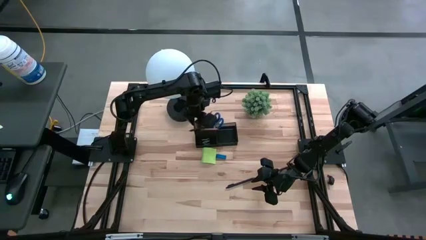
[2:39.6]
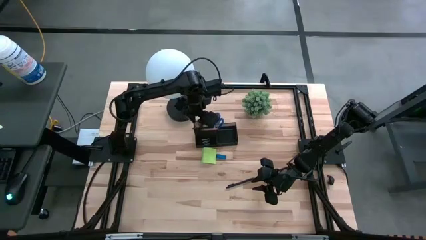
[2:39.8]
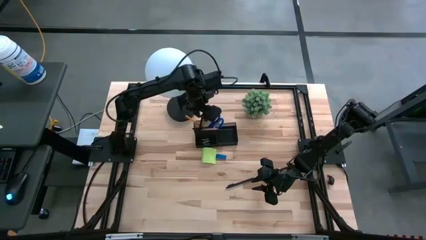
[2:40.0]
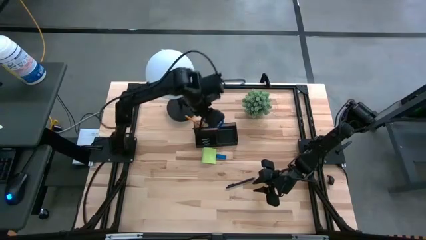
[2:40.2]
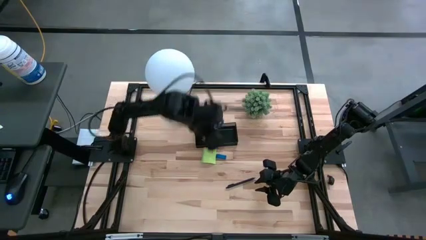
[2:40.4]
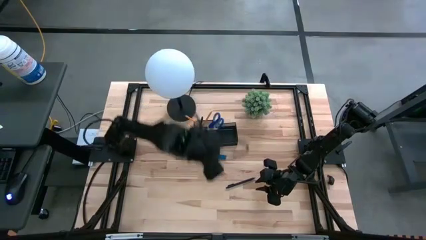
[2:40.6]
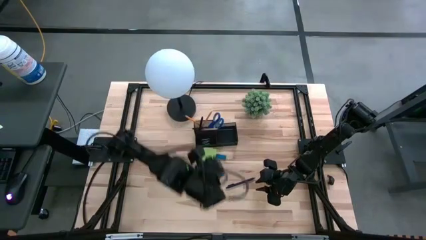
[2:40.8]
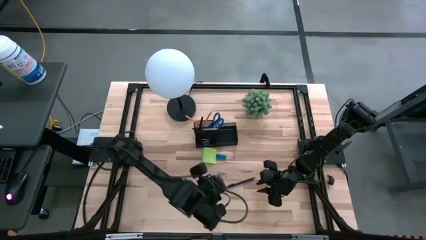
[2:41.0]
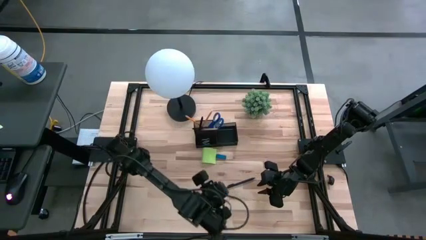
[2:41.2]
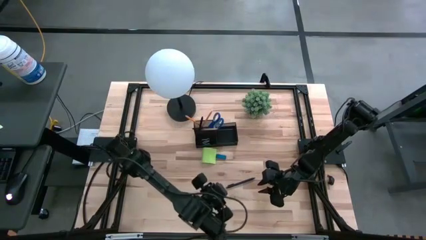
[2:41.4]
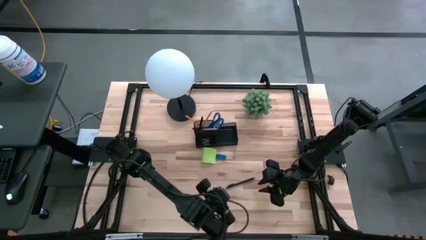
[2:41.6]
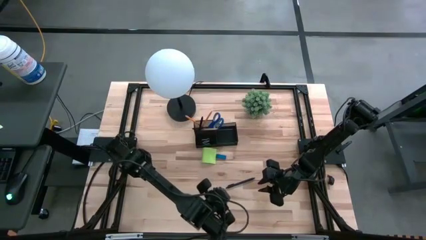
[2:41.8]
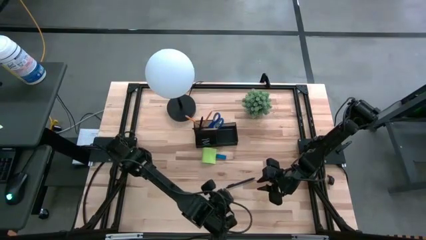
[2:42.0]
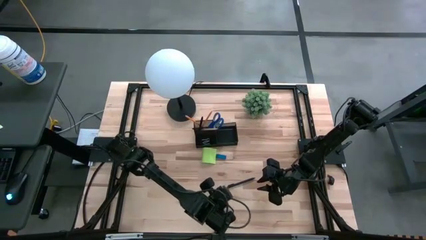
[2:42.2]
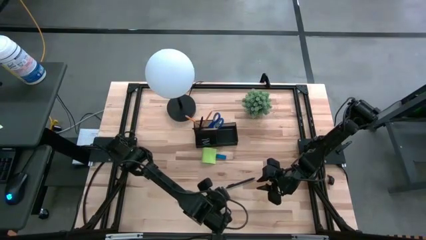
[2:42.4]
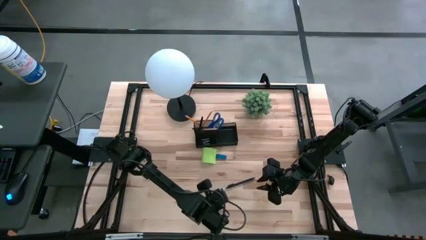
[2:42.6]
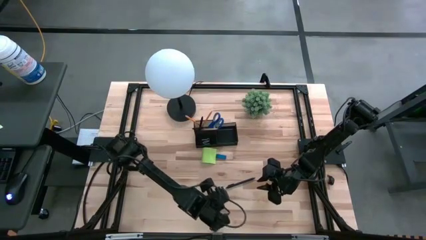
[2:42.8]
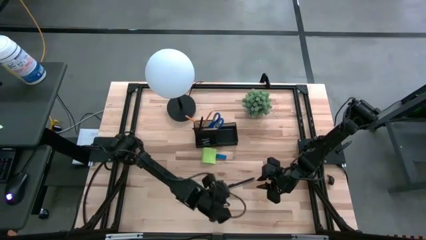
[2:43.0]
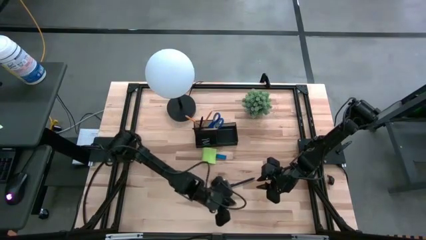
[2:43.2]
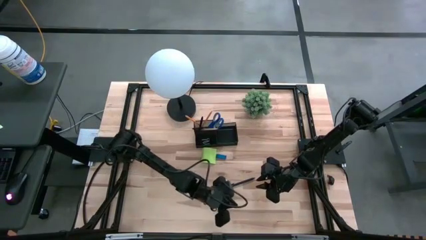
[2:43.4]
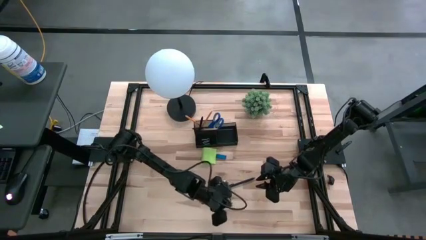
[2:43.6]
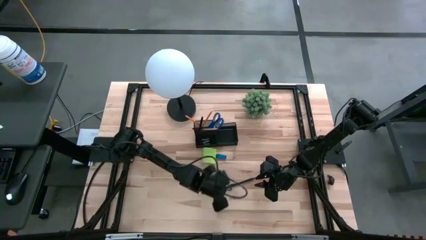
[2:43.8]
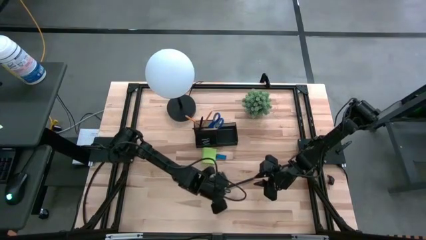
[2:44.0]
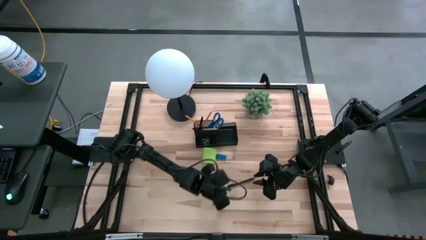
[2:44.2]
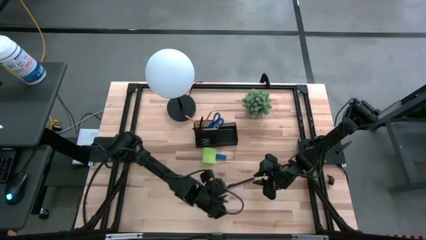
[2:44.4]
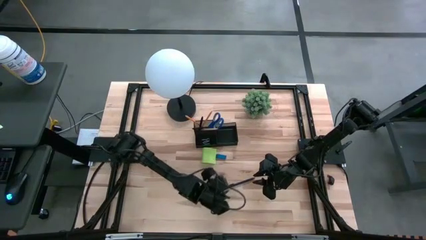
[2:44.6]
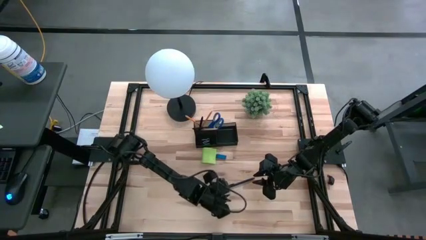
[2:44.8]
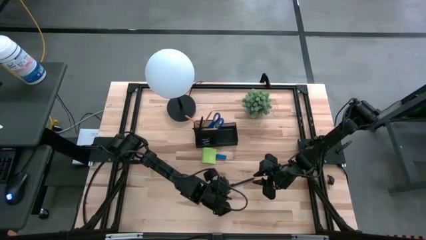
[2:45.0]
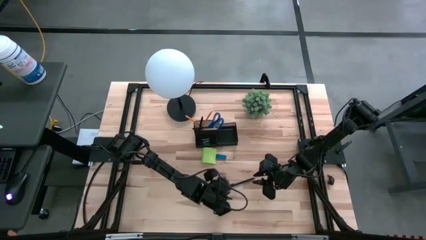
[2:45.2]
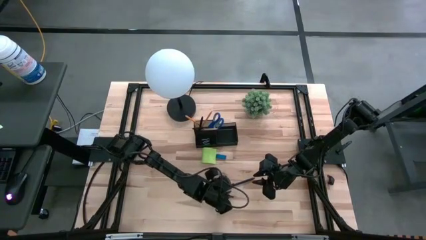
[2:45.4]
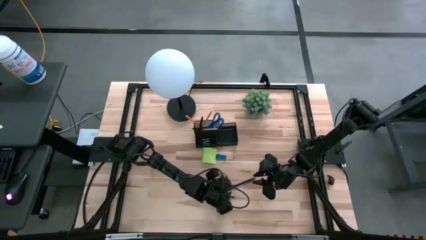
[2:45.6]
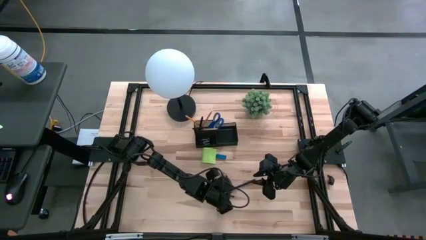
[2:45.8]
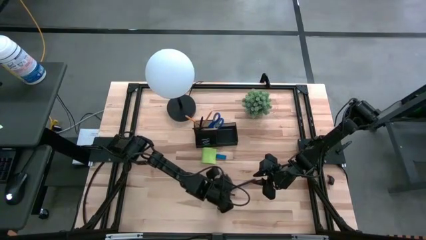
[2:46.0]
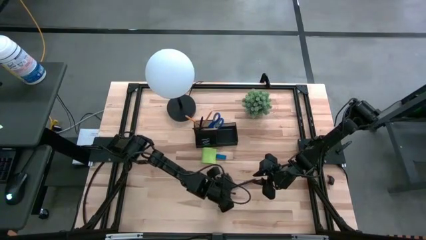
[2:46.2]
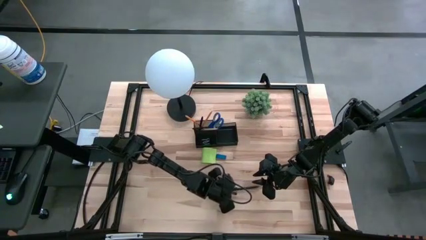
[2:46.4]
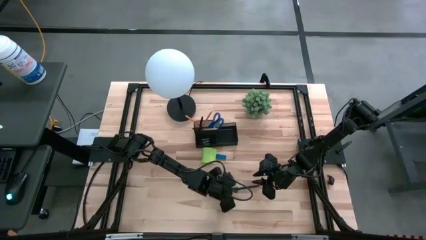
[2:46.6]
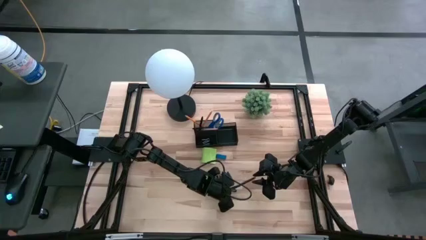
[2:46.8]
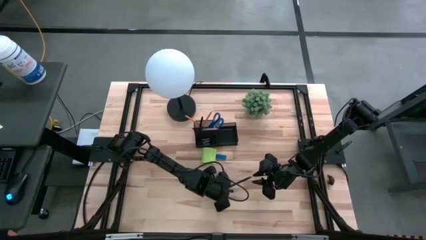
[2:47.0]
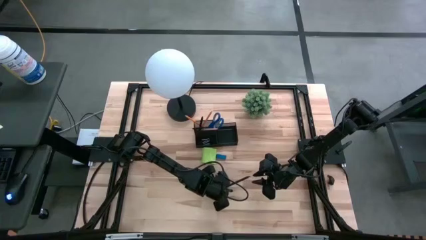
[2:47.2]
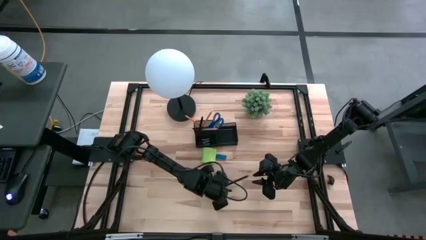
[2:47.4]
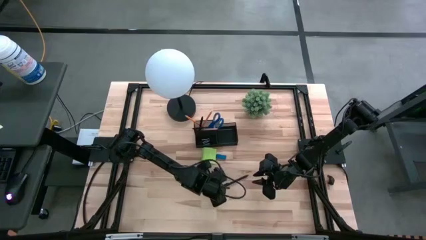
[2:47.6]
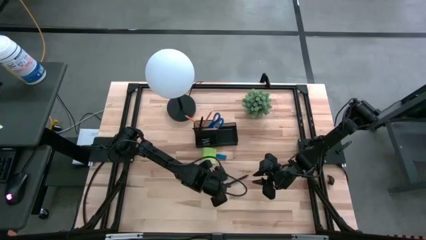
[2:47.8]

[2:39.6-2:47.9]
Task: Pick and place office supplies into organizer
Put the black pen into the top left side of the desk organizer

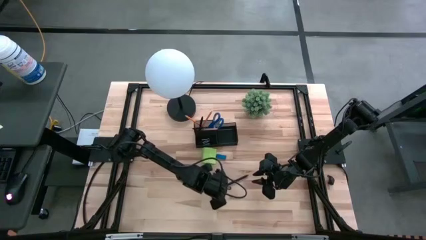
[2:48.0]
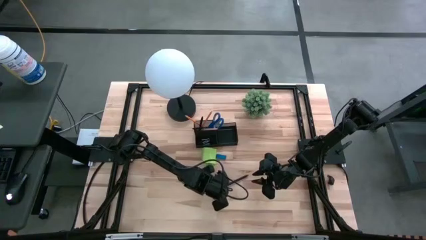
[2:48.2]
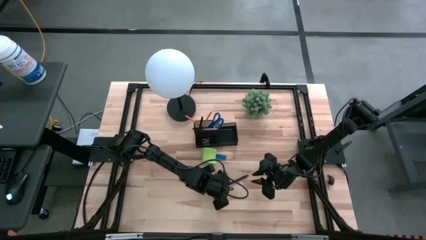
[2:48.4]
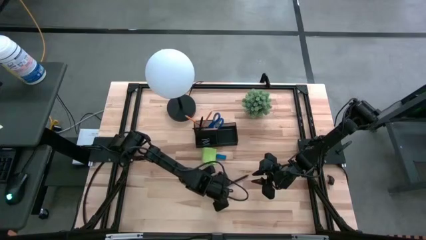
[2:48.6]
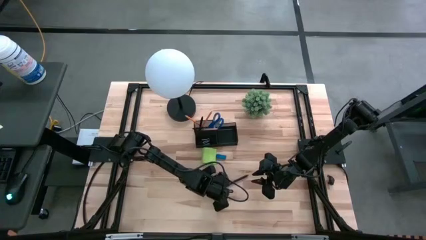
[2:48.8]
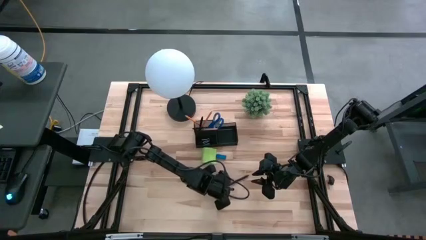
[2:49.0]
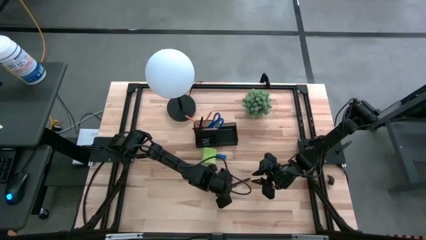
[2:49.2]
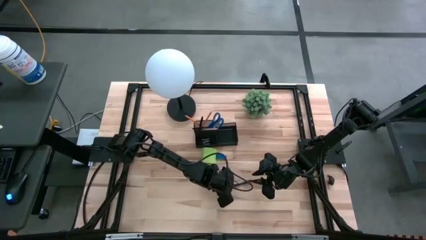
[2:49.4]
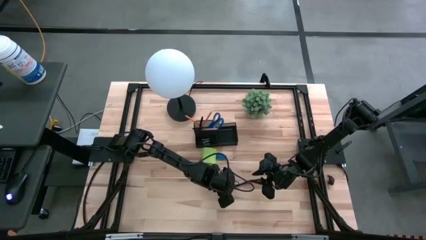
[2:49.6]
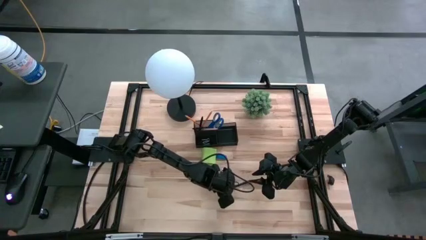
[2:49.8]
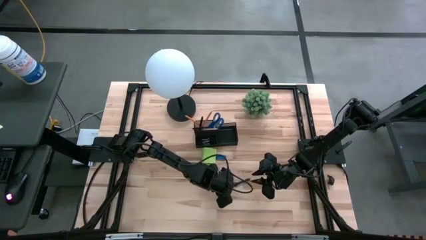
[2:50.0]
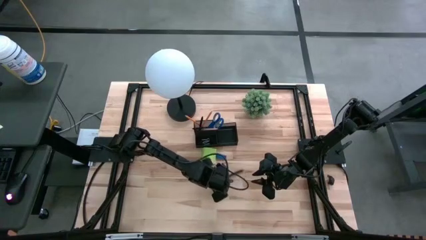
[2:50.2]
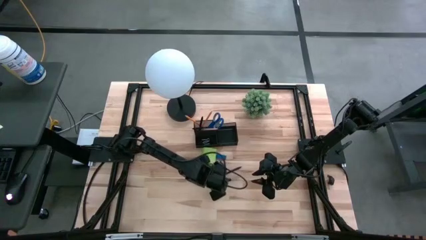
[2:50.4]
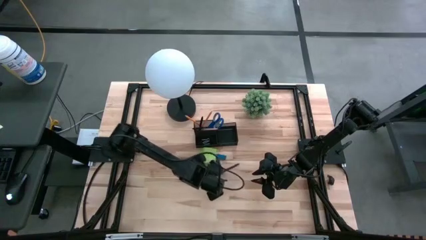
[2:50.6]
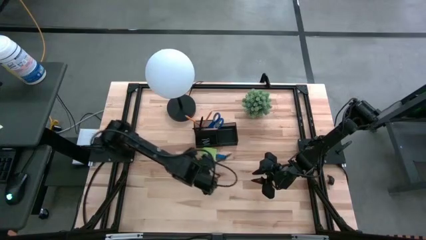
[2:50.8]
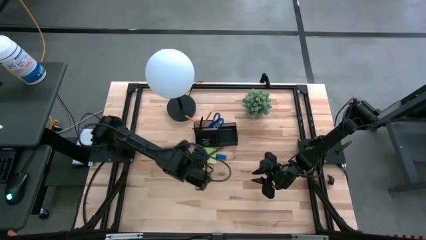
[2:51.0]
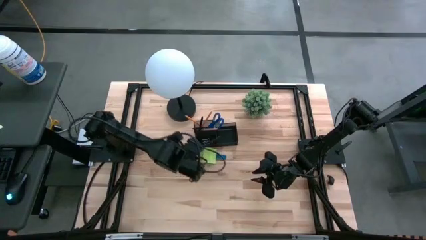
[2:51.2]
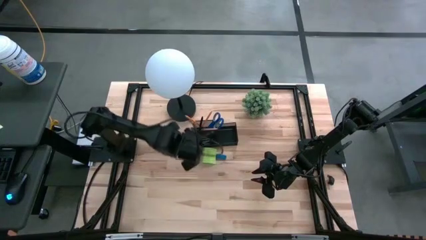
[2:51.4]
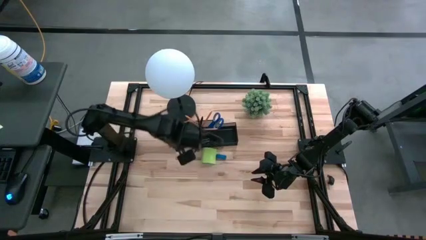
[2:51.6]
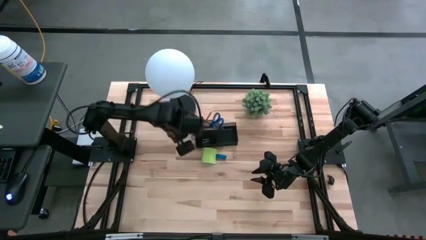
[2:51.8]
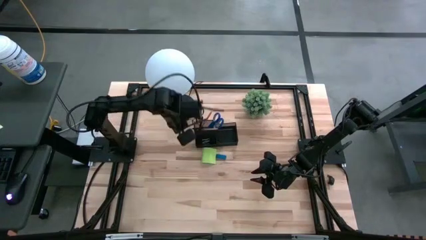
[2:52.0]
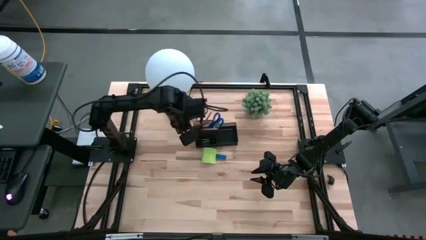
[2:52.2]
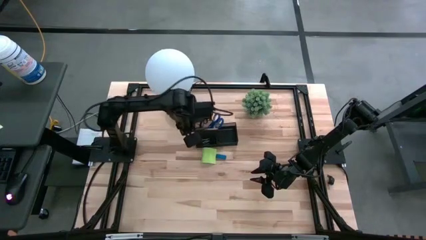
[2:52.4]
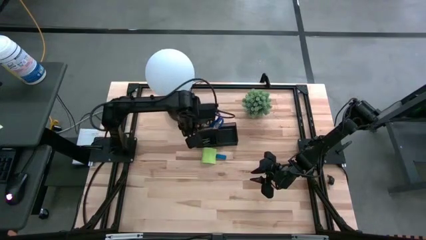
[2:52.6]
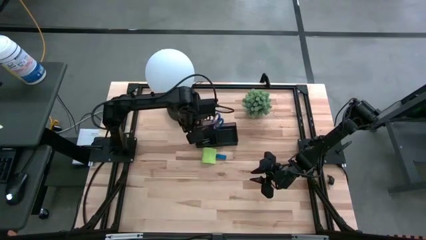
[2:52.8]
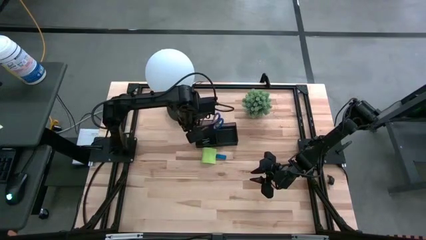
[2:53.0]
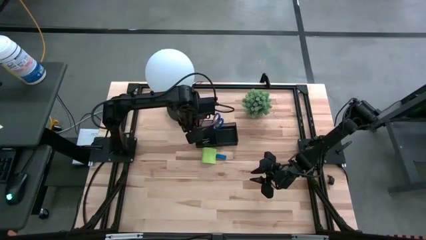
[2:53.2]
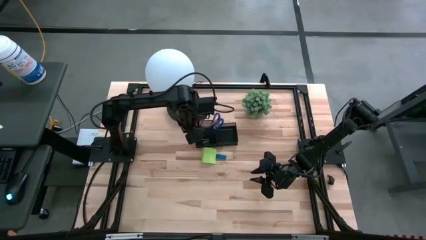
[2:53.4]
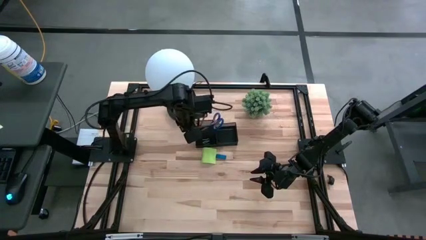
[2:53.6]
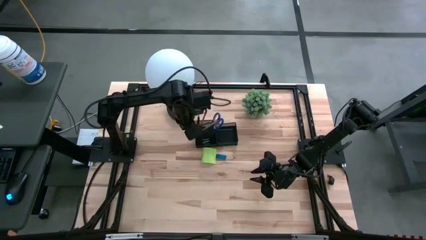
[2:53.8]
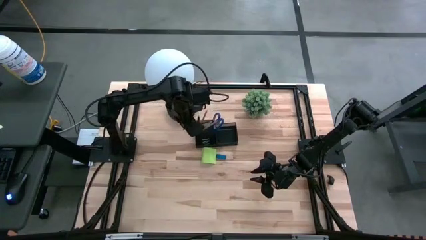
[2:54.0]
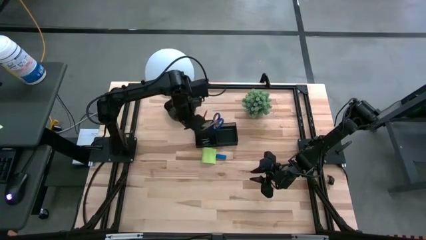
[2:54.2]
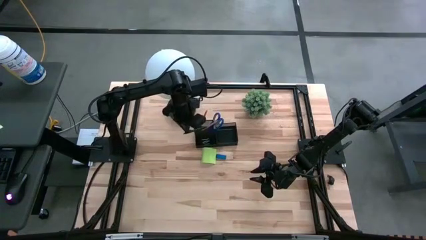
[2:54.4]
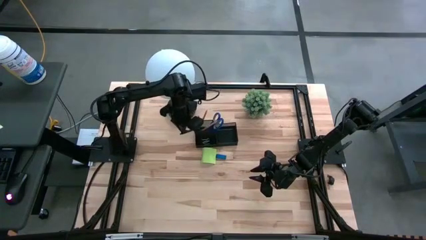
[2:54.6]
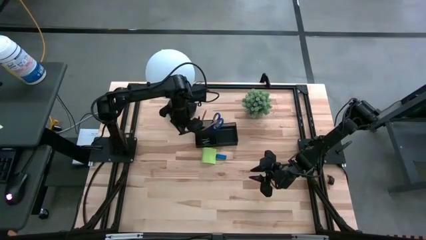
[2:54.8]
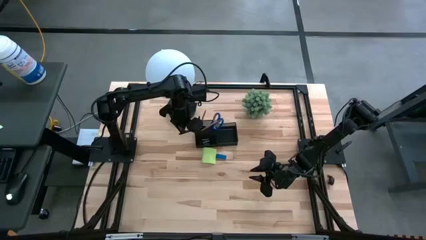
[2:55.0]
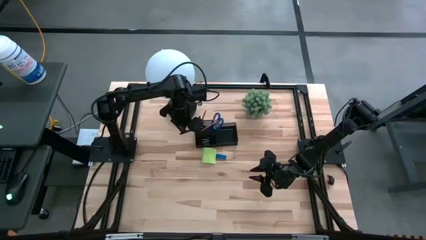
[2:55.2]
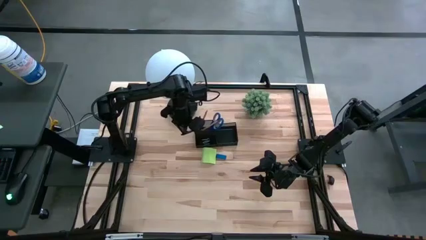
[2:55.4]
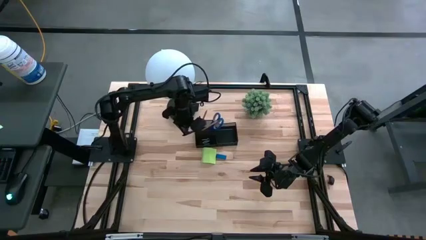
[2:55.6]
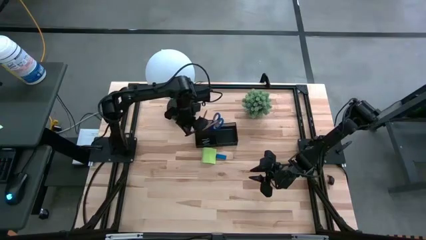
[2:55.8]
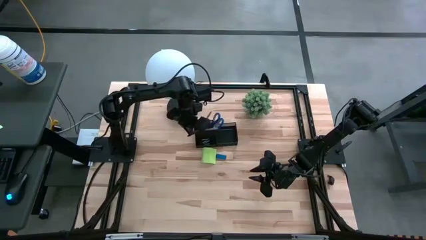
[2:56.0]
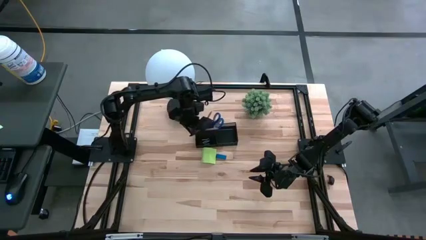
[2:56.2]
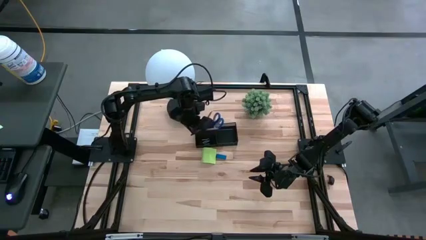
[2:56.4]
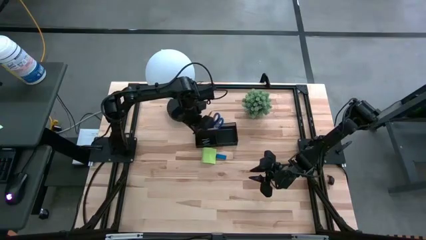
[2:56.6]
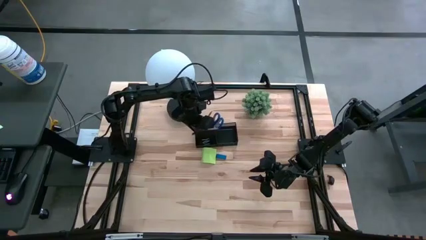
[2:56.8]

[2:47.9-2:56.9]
Put the black pen into the top left side of the desk organizer
